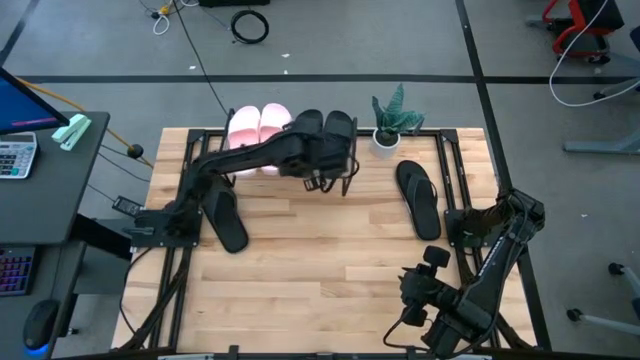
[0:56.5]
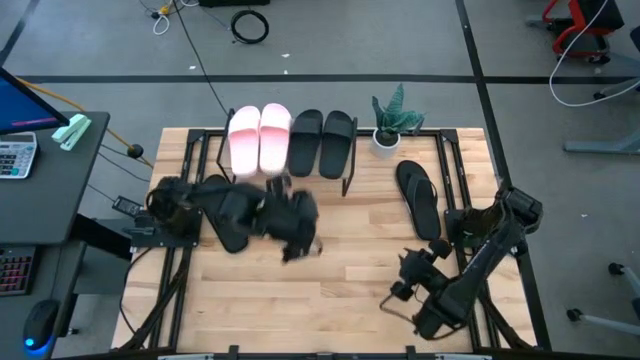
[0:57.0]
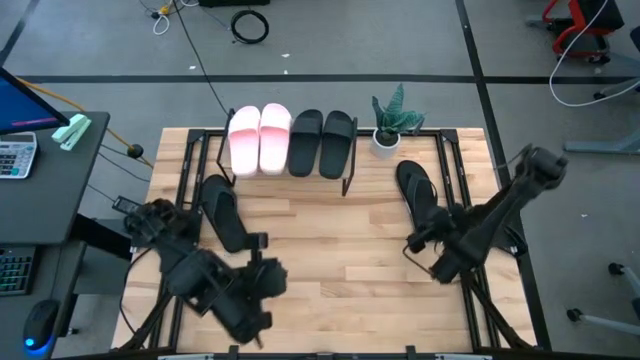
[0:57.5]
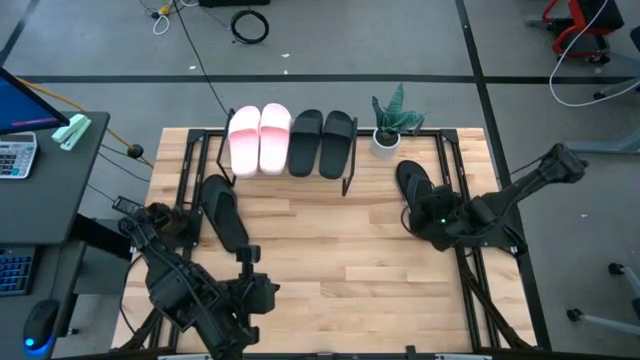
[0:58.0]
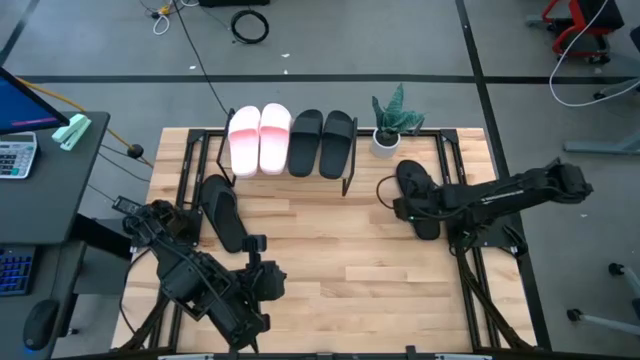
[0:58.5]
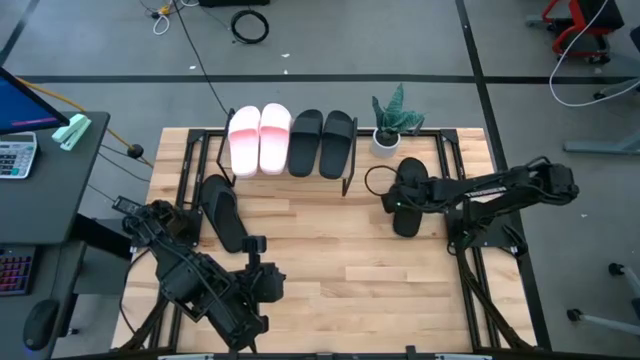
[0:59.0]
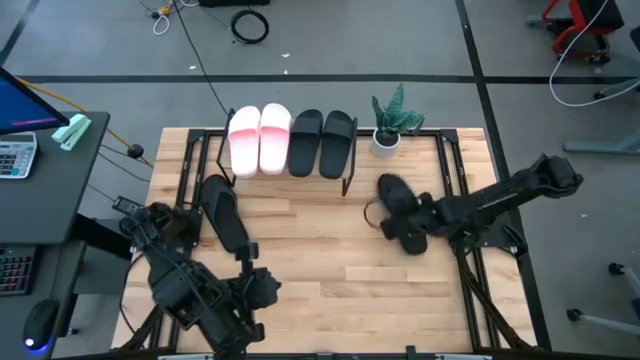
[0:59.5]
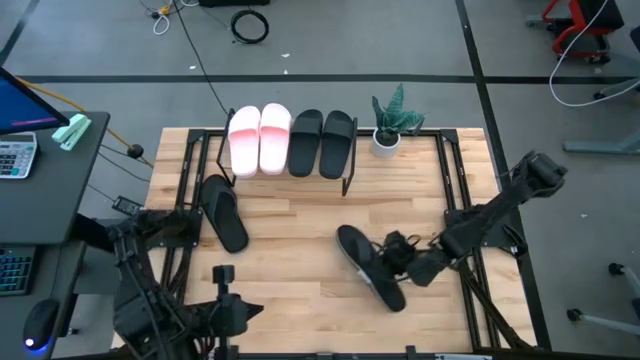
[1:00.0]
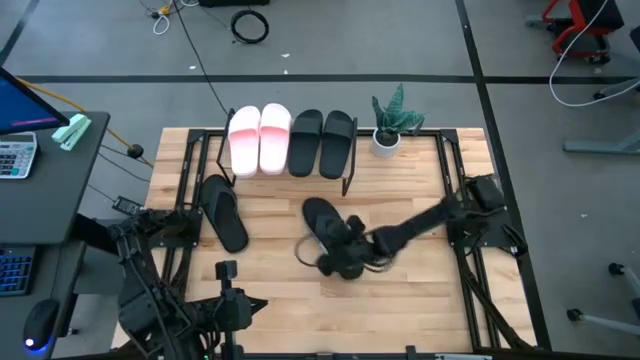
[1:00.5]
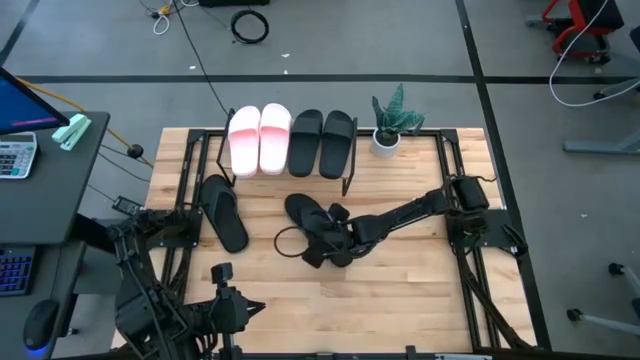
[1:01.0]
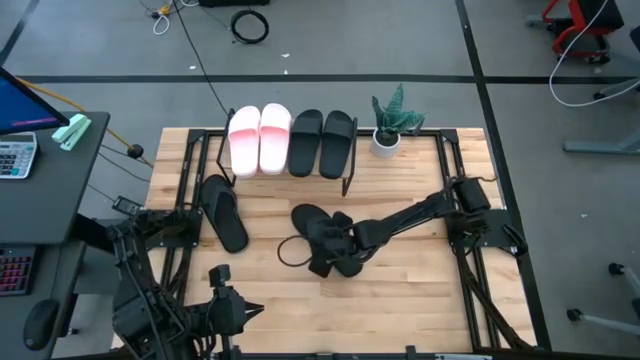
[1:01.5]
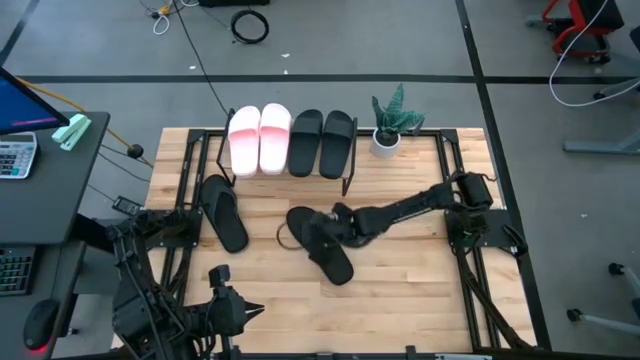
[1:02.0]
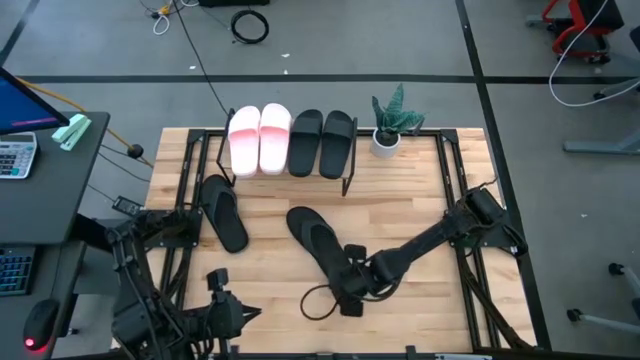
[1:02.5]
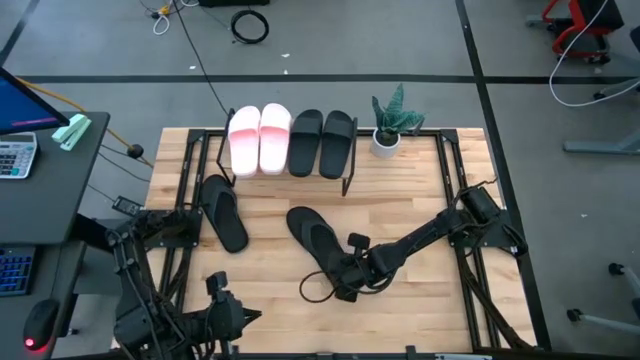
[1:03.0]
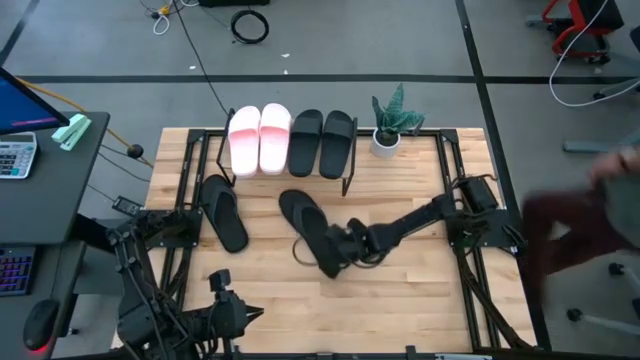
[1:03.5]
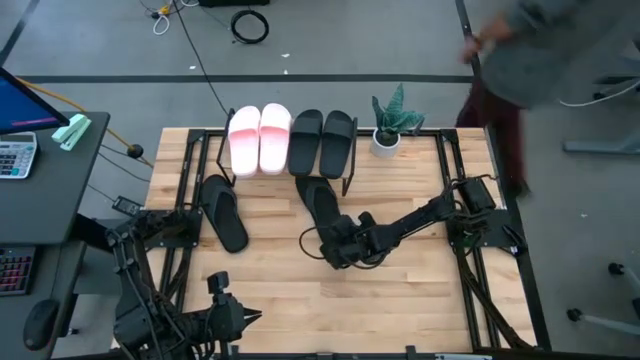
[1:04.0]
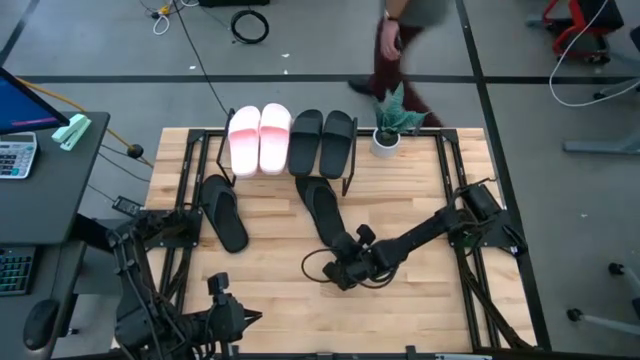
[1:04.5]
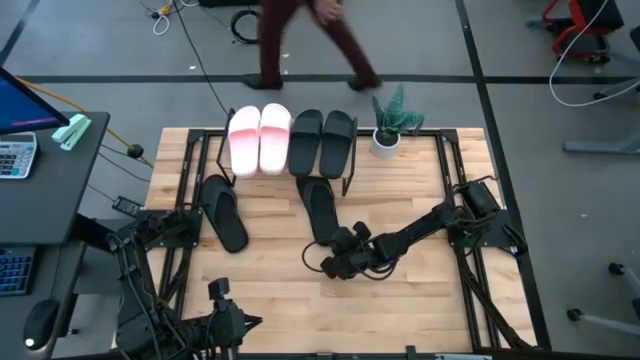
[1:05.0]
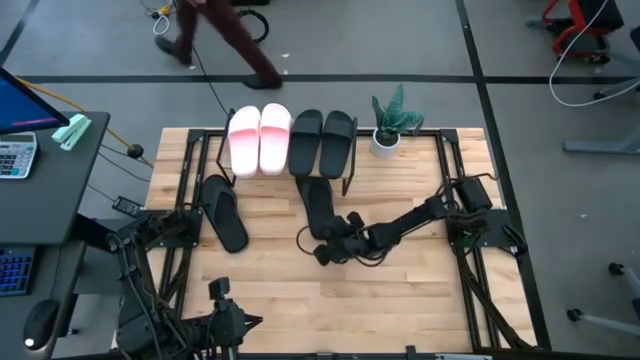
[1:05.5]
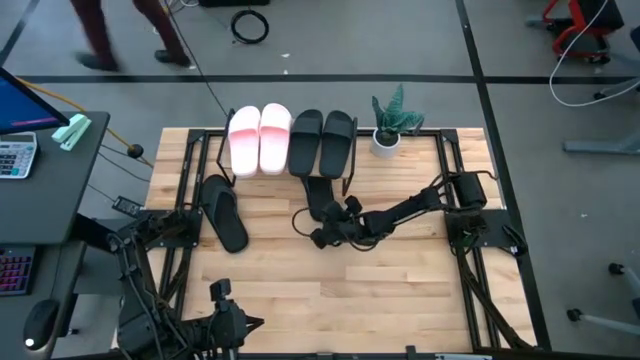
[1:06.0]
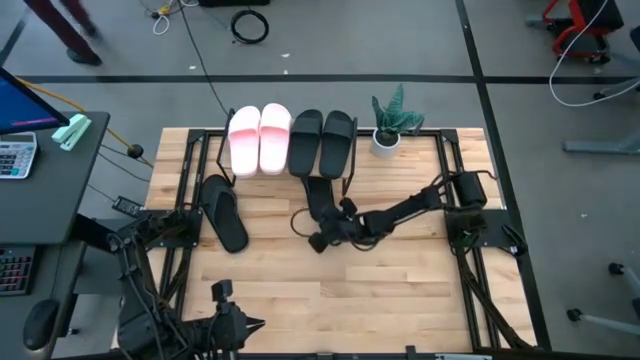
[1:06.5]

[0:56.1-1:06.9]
Task: Pick and place slides into the shelf
Move the right black slipper under the shelf

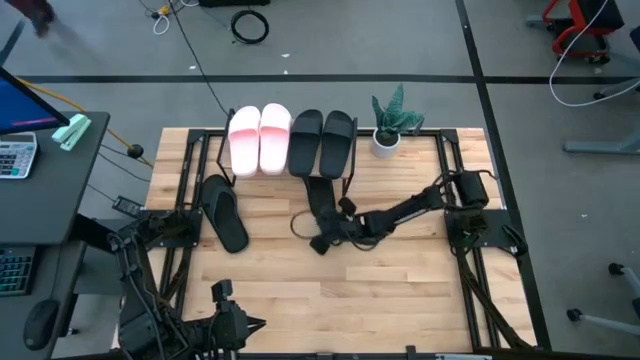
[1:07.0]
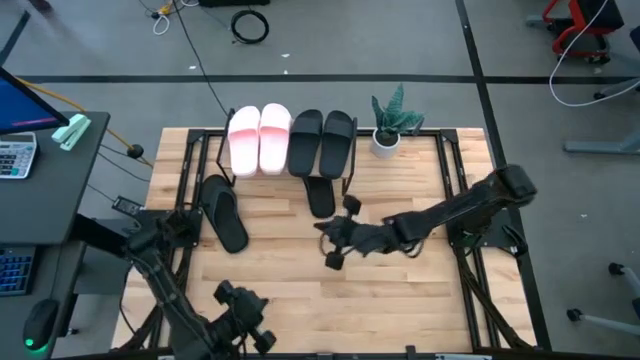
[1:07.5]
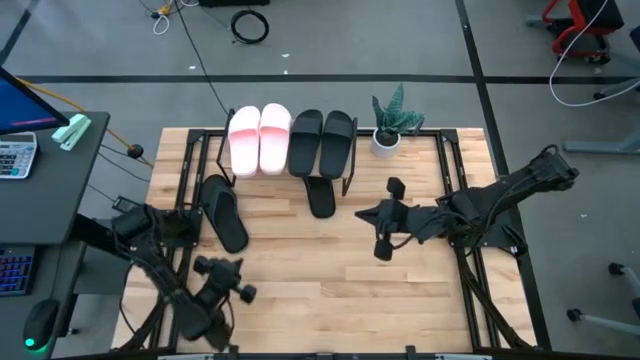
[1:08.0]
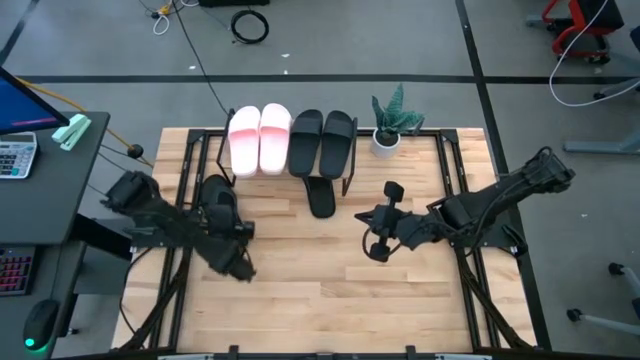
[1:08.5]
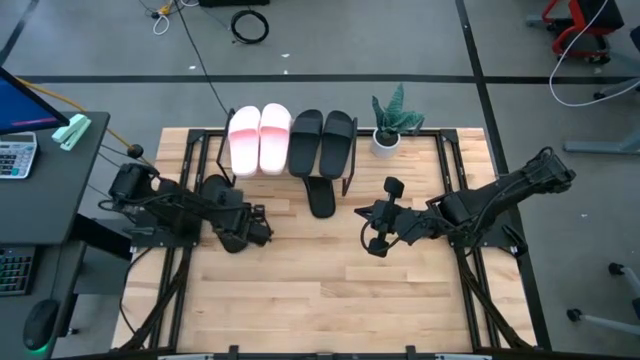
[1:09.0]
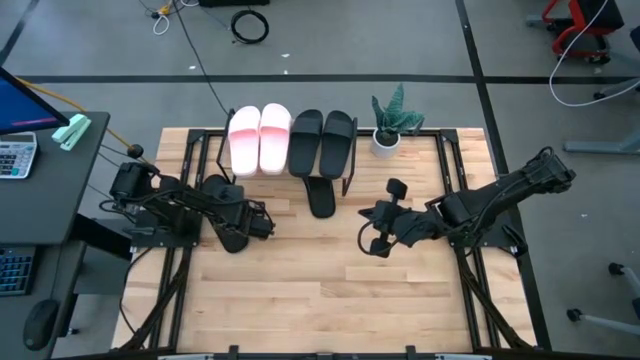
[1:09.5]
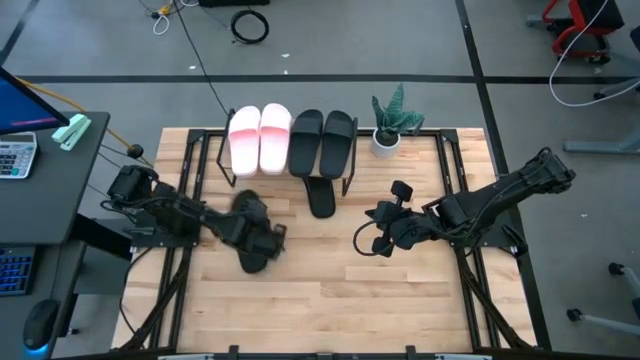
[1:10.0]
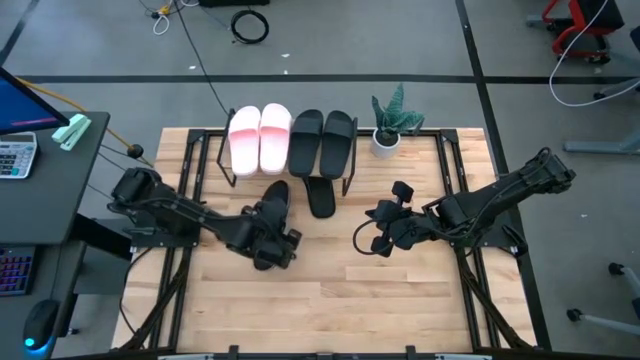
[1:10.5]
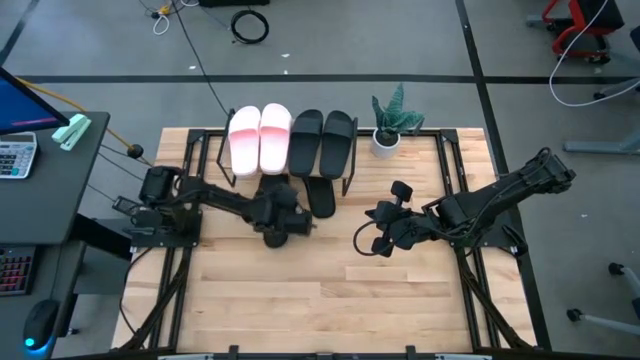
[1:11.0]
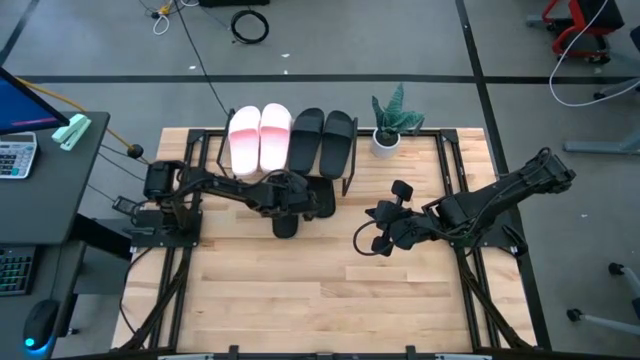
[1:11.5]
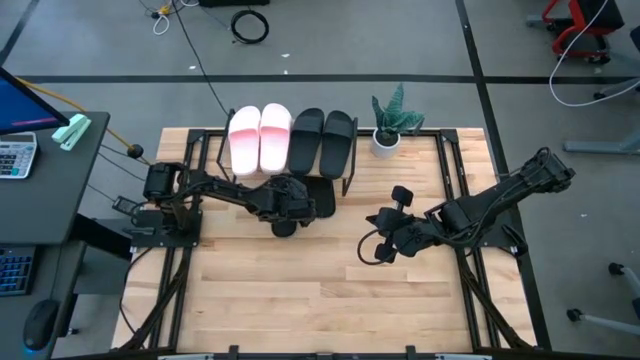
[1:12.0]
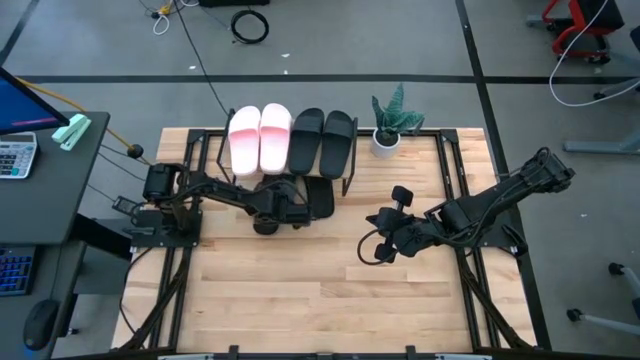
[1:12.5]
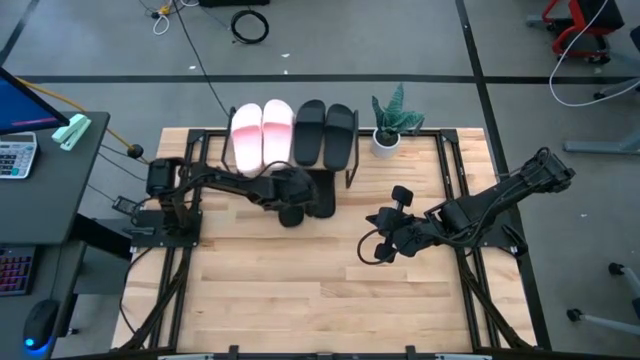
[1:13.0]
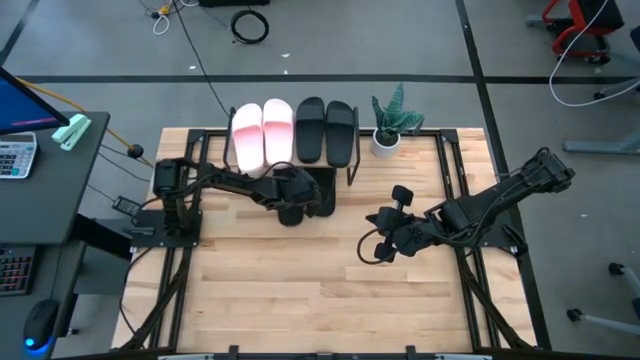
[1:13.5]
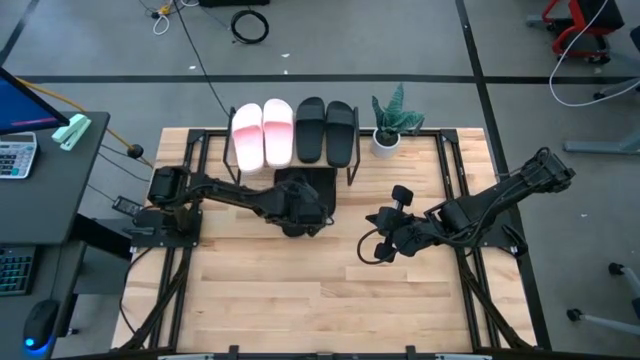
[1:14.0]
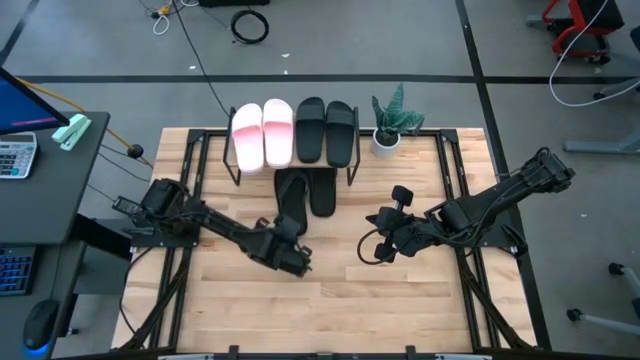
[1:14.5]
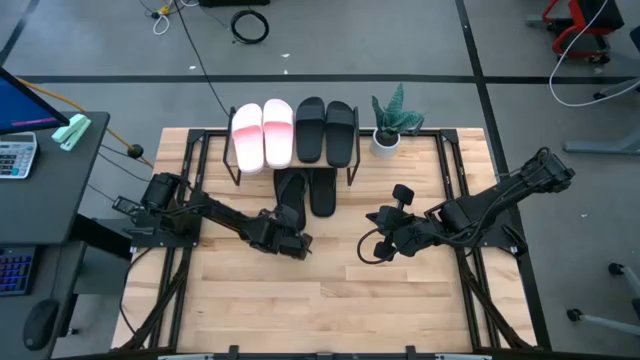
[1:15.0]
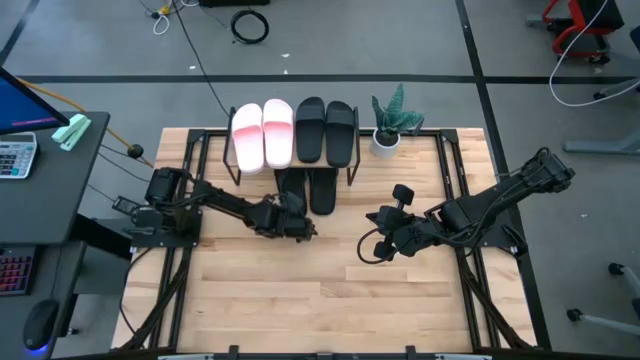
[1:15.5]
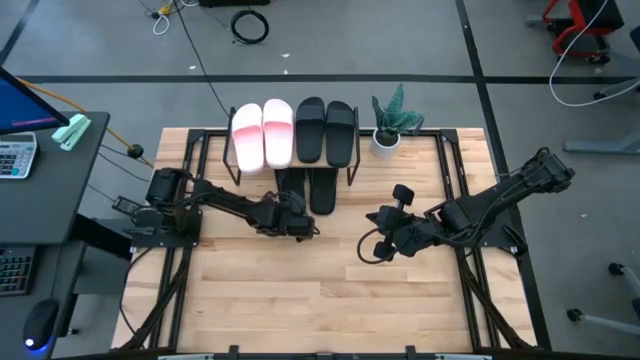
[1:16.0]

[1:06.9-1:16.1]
Move the black slipper under the shelf

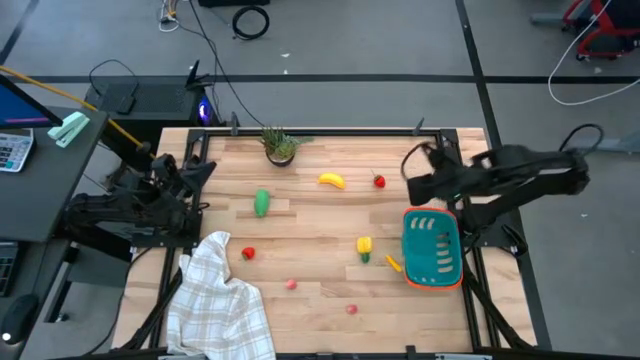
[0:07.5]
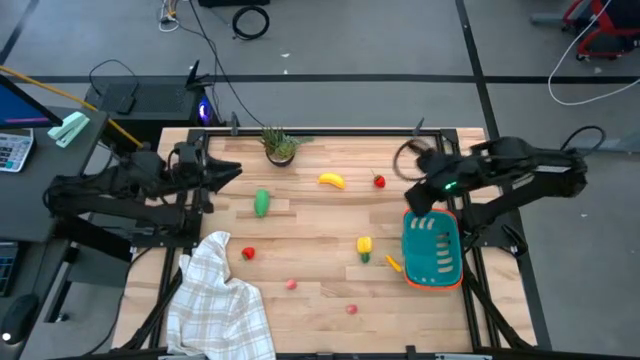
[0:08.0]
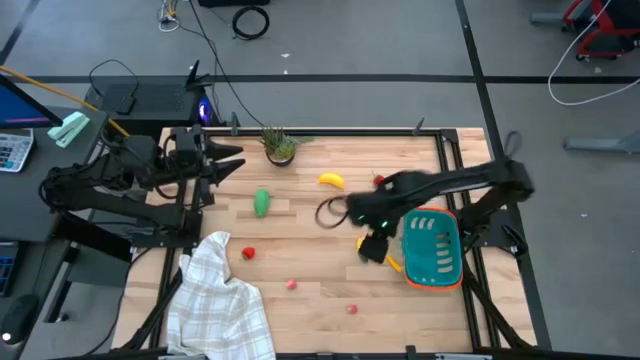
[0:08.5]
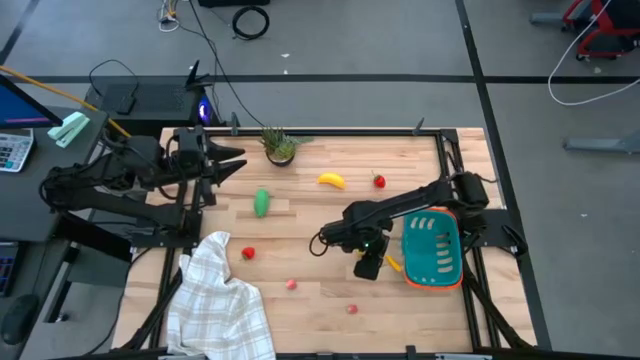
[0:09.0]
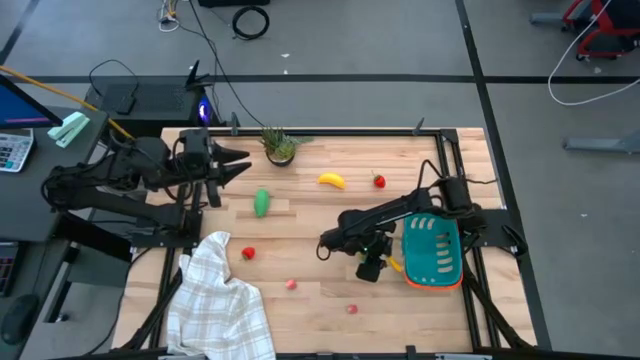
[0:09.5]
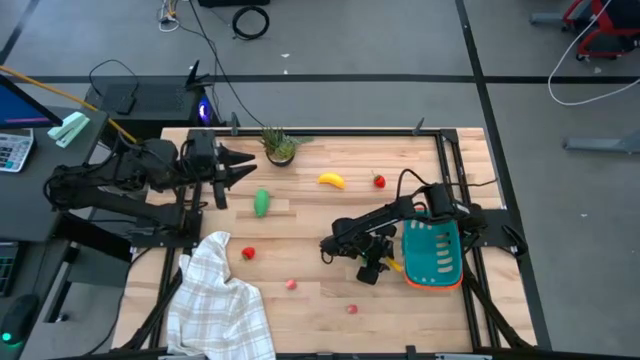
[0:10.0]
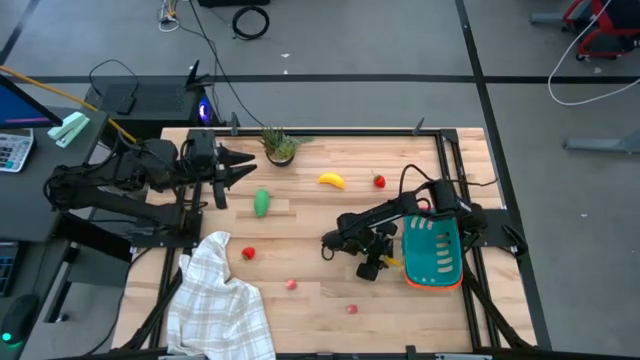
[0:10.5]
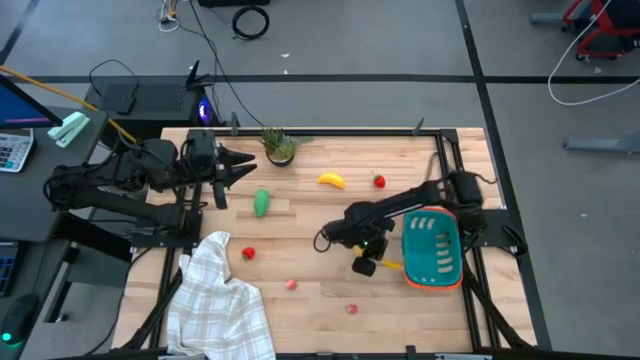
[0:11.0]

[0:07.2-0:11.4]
Task: Pick and placing Produce into tupperware
Put the yellow corn into the blue basket
